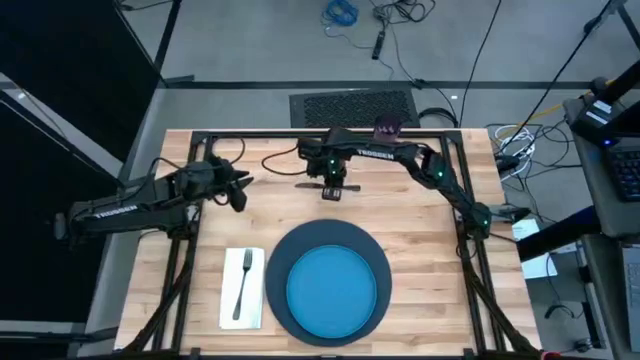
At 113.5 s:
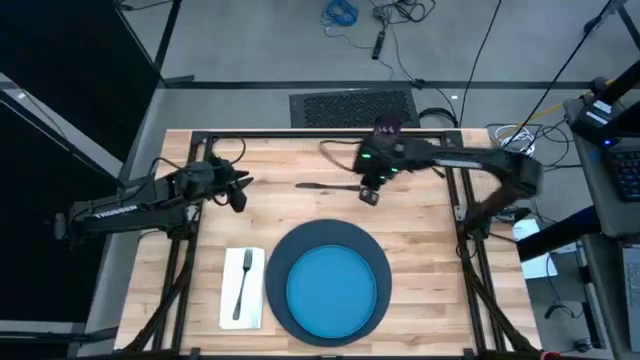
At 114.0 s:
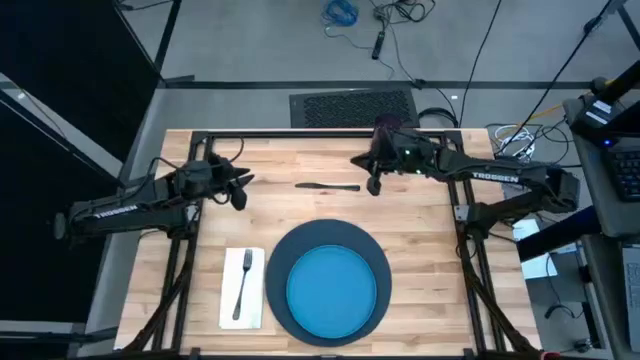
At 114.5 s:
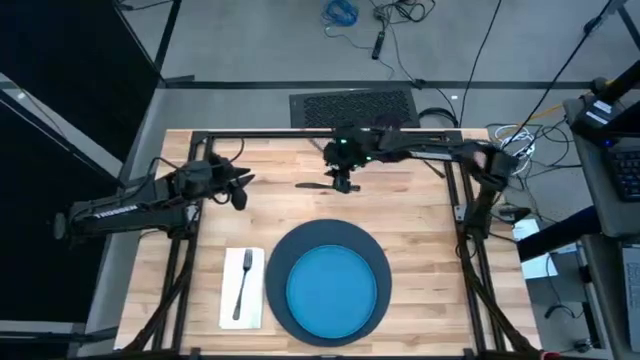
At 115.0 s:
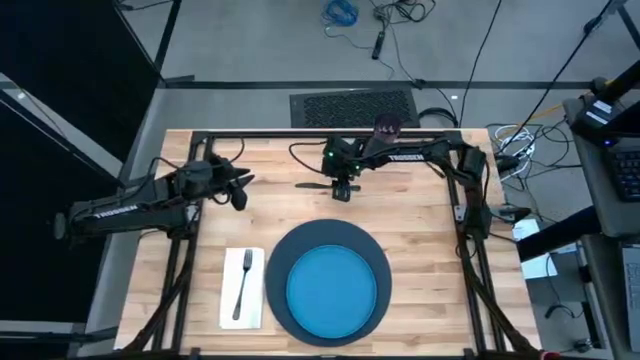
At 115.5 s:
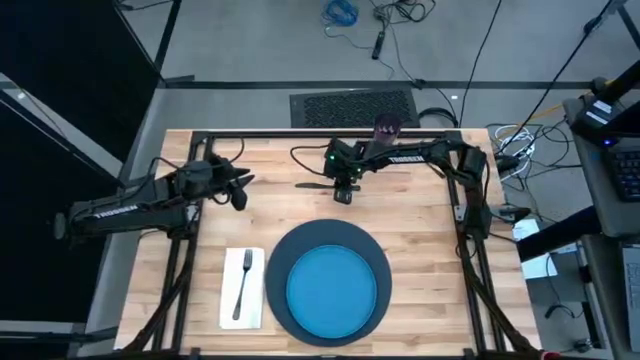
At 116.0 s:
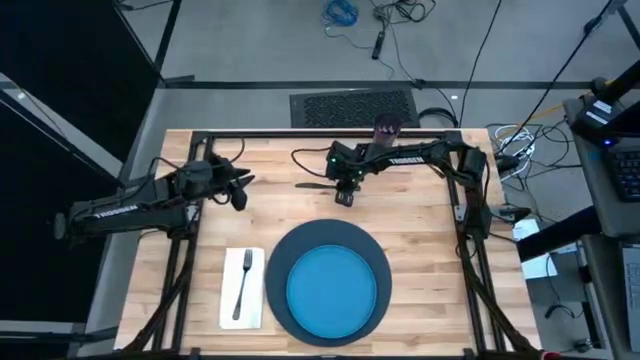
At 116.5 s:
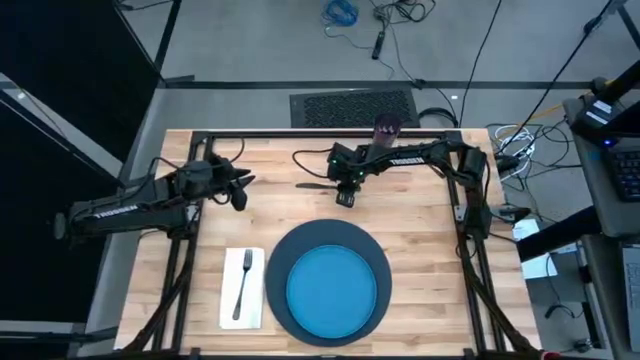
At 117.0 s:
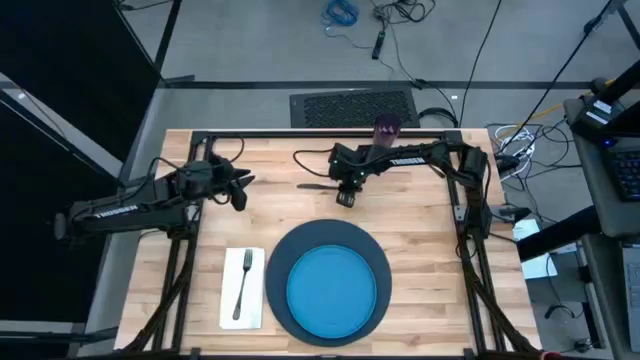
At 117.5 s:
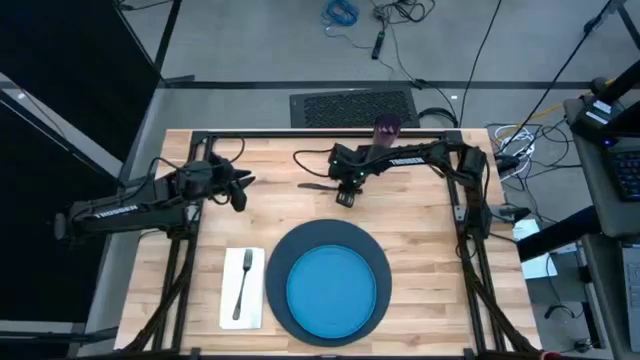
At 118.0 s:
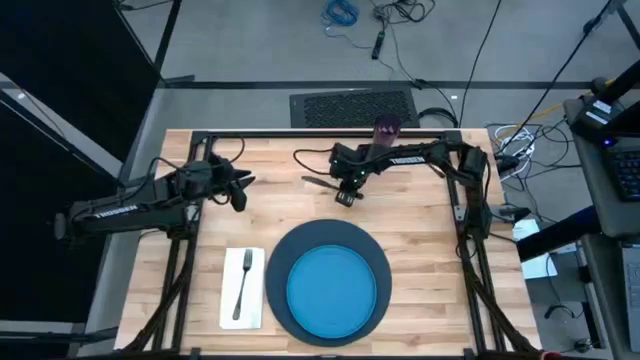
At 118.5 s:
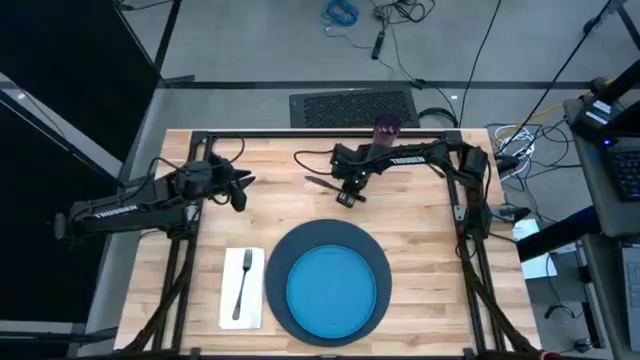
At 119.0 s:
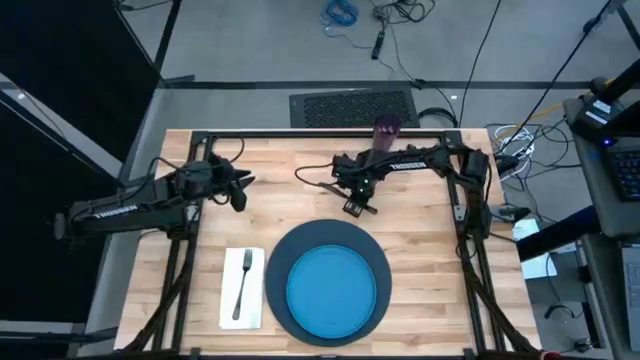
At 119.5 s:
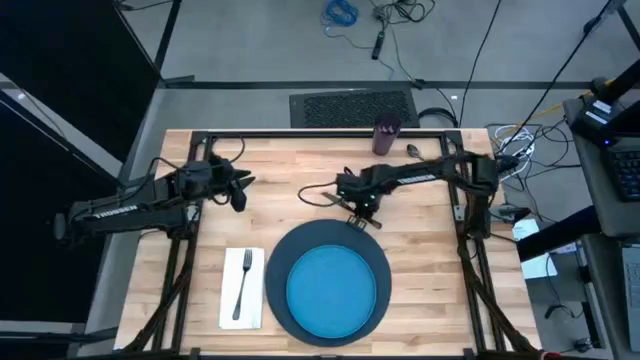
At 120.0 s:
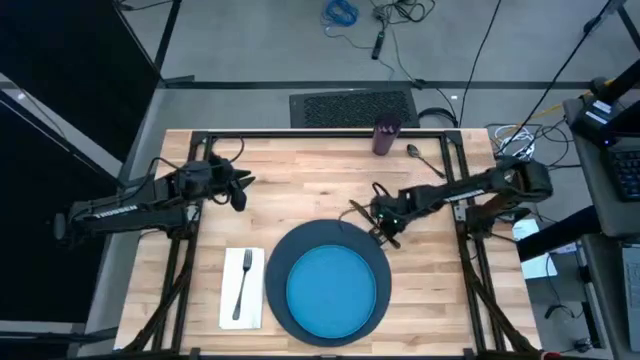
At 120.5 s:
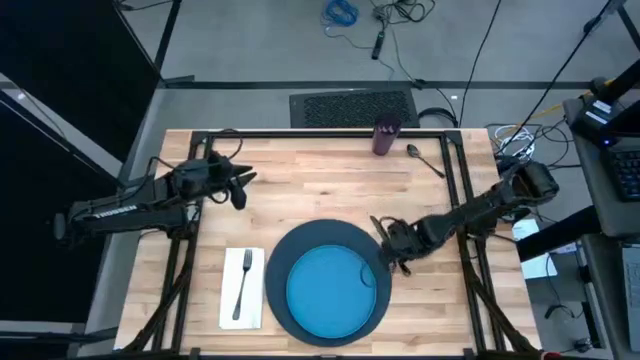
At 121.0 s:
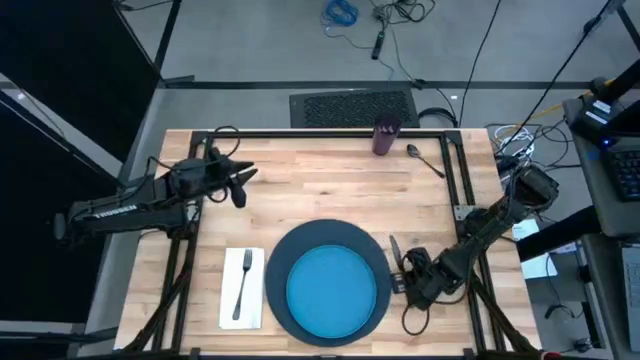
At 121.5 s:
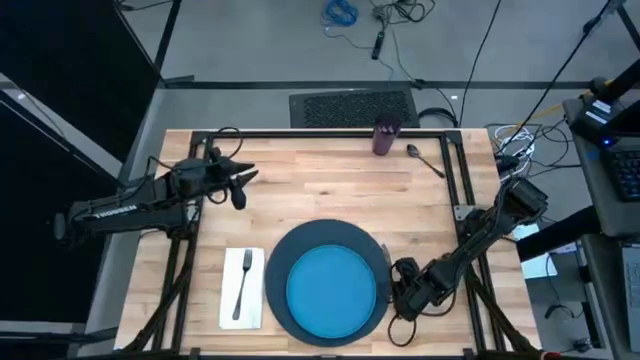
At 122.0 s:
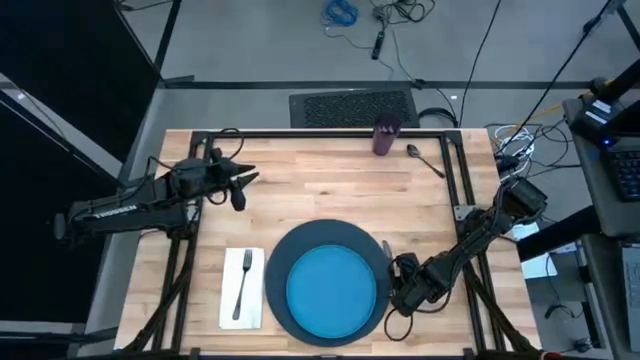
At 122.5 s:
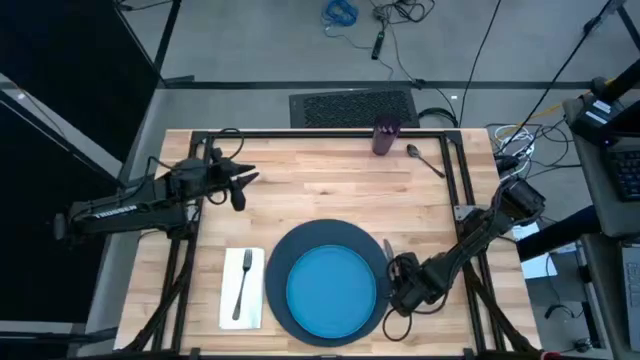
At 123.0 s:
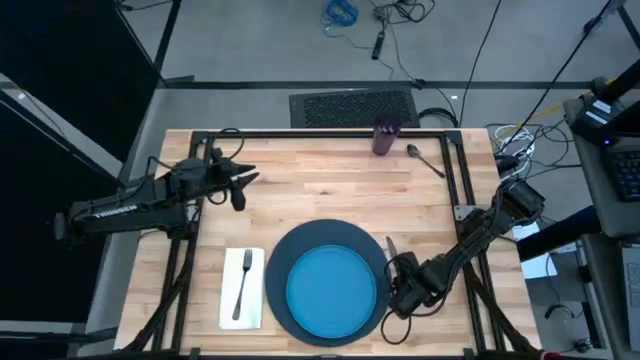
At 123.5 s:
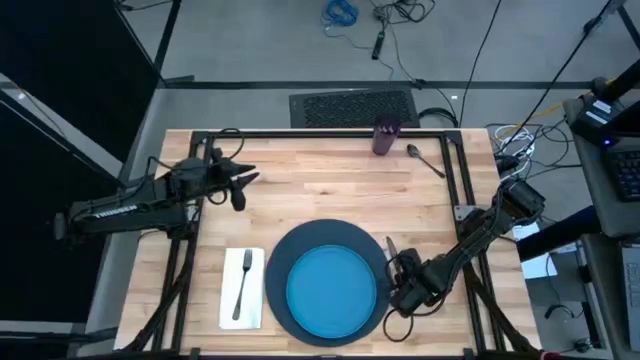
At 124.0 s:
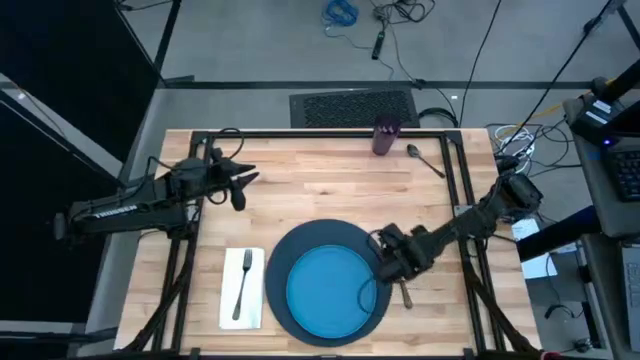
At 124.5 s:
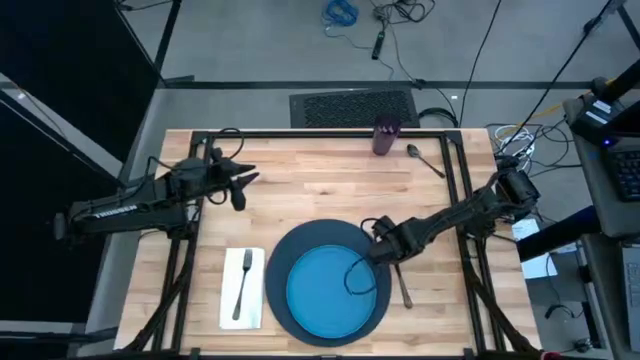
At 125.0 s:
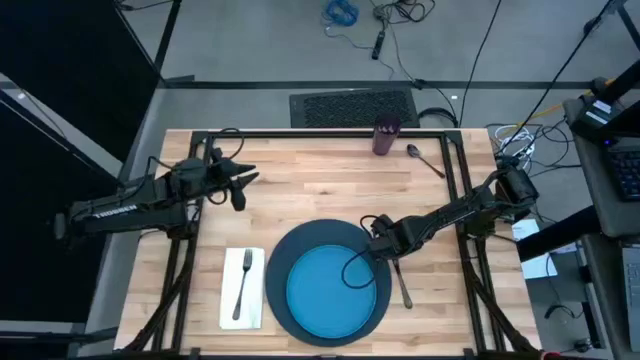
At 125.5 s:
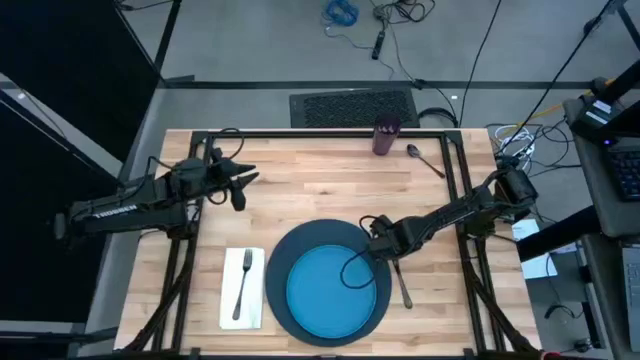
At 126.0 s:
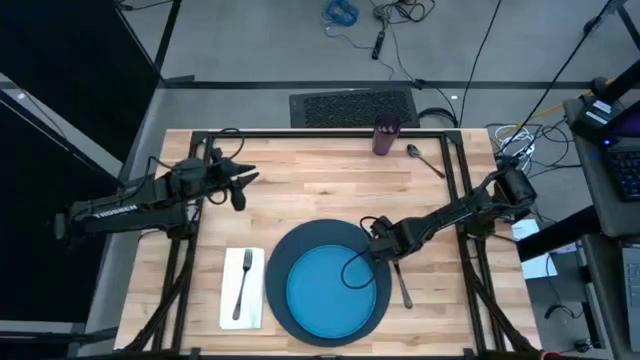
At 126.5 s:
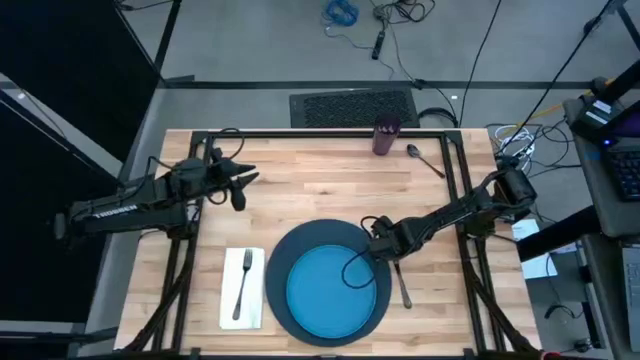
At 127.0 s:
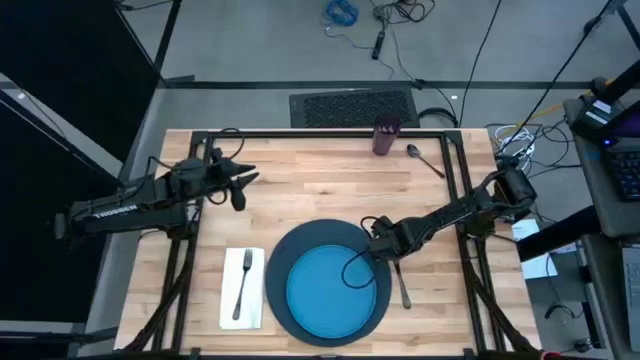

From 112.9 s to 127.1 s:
Task: Set table place
Move the black knife to the right side of the blue table mat on the table

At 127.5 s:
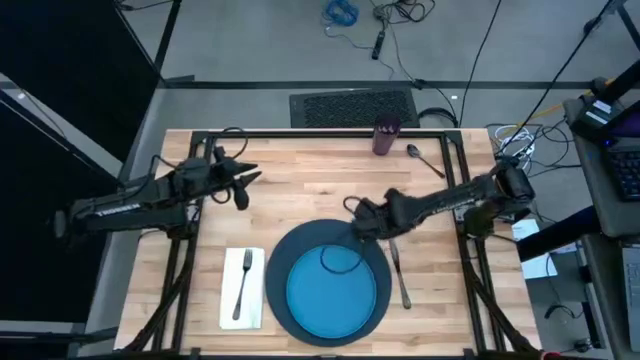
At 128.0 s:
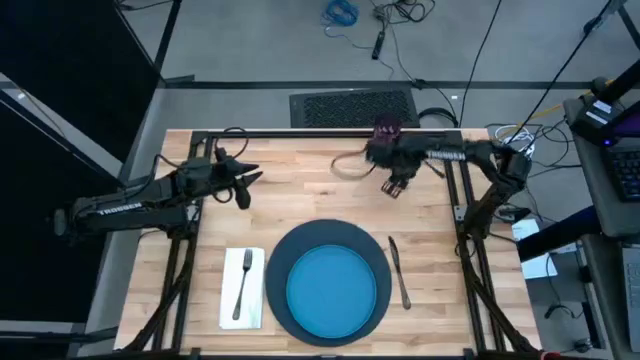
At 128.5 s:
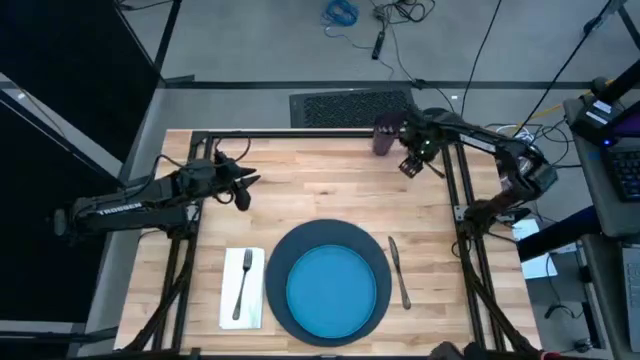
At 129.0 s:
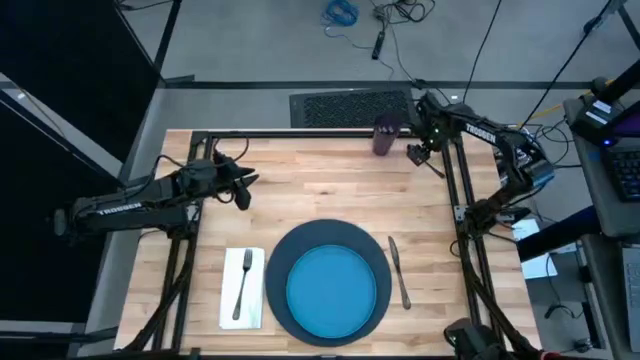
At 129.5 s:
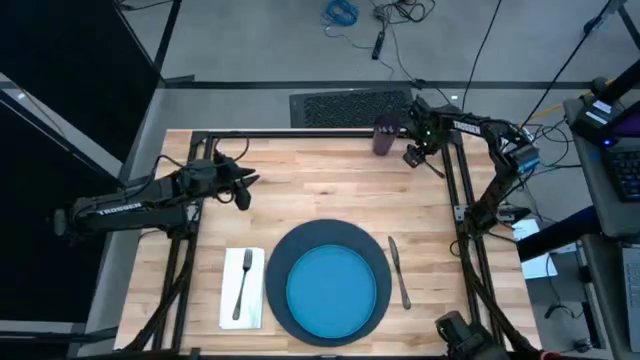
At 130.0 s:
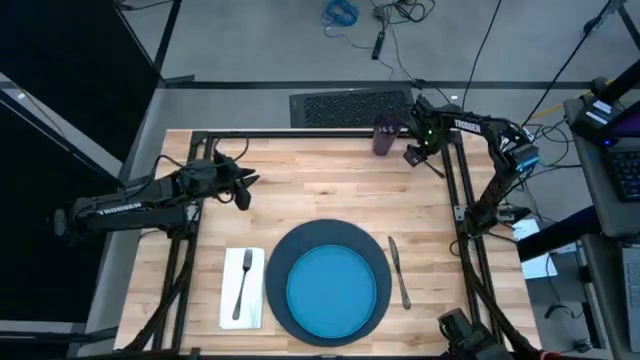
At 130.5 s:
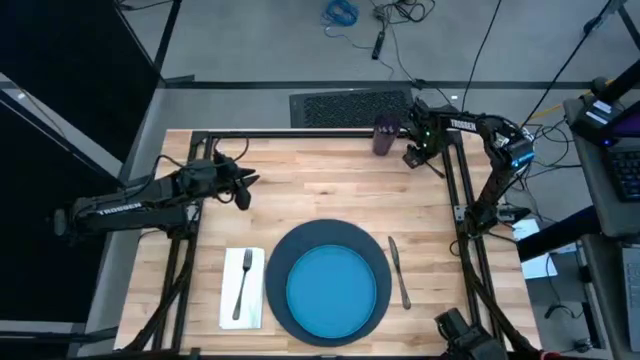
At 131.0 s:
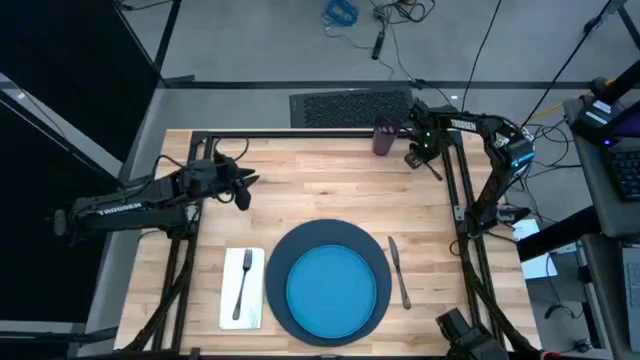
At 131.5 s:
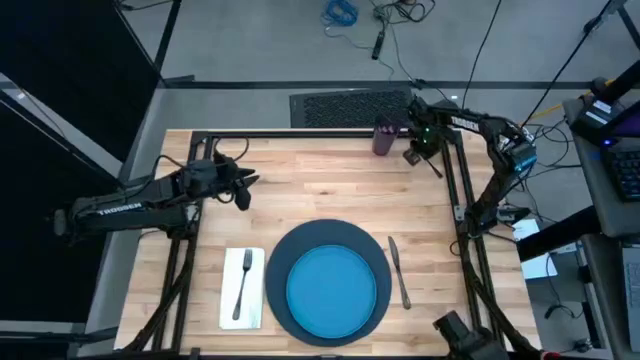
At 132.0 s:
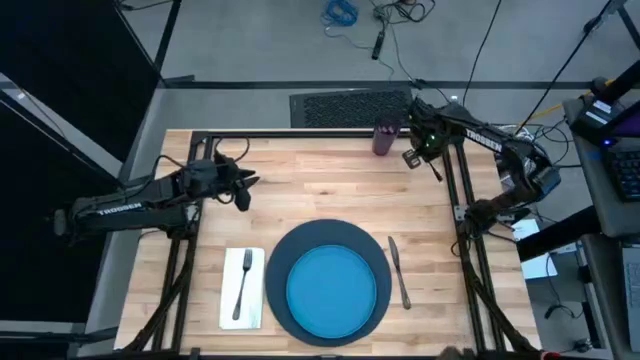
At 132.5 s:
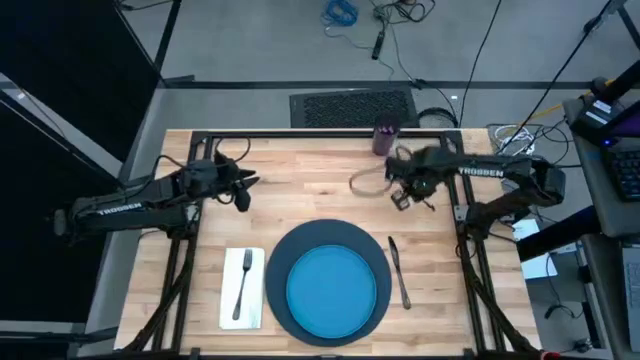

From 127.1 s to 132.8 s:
Put the black spoon to the right side of the black knife on the table

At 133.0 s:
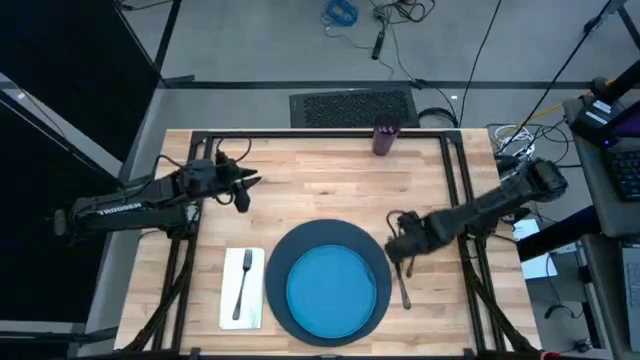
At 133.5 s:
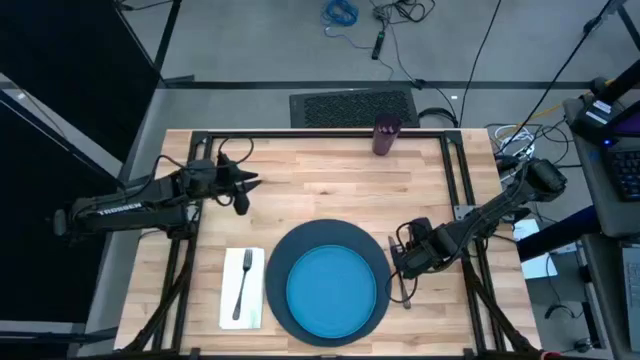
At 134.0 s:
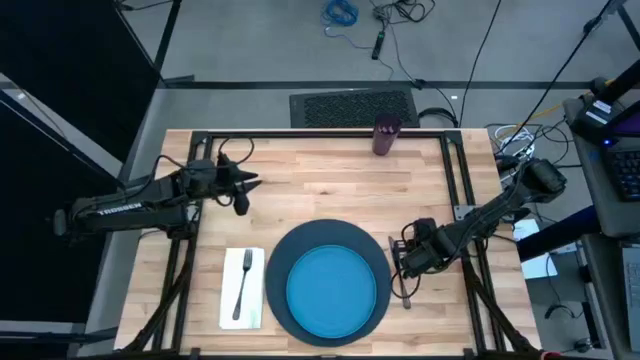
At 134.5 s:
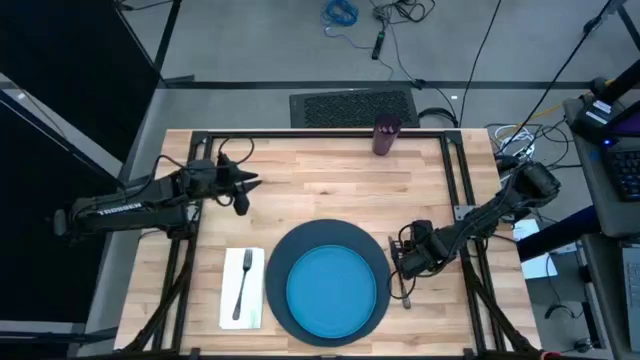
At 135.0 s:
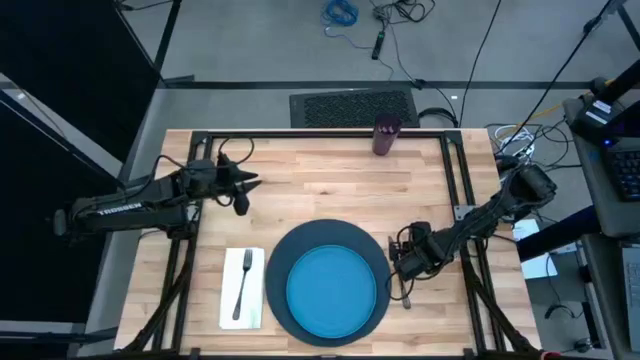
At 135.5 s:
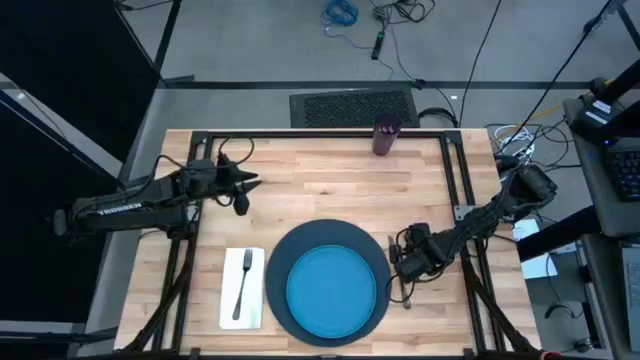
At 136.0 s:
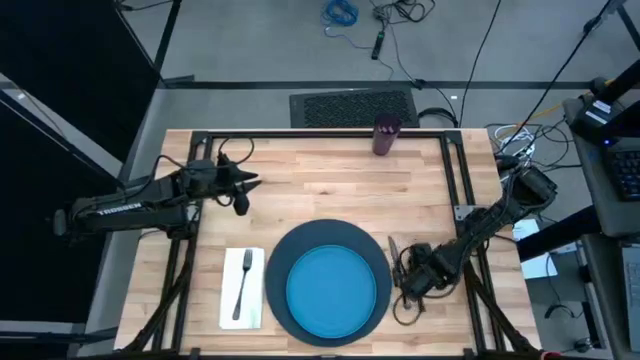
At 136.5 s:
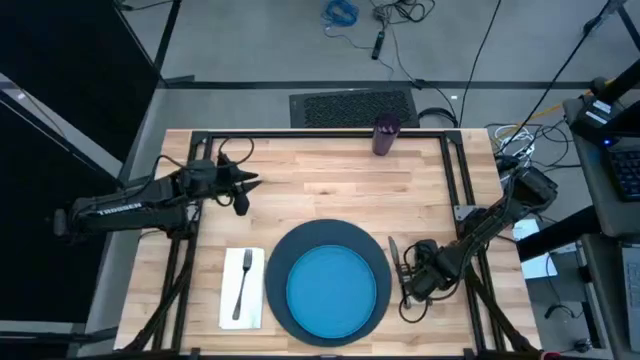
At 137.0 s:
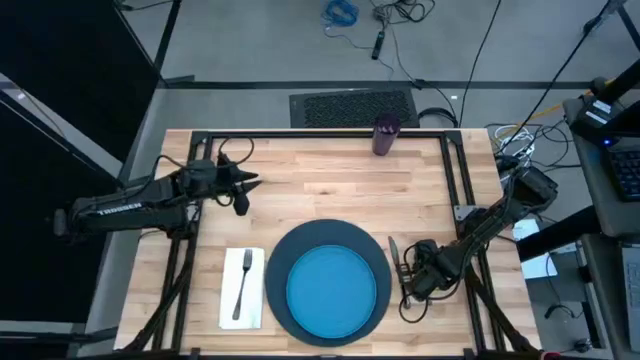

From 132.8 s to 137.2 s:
Put the black spoon to the right of the black knife on the table
